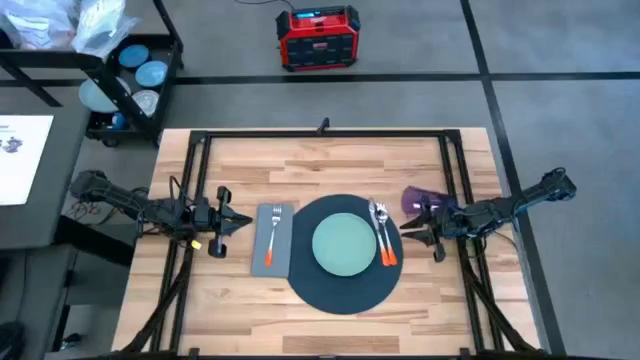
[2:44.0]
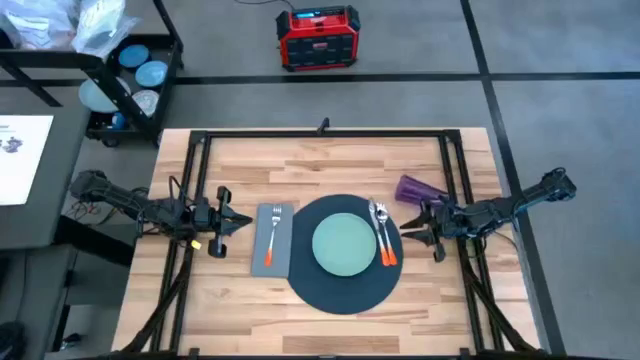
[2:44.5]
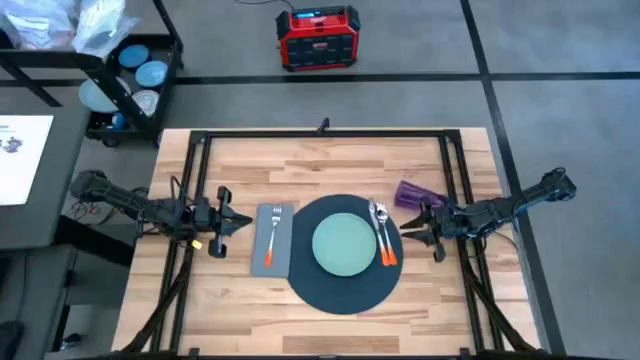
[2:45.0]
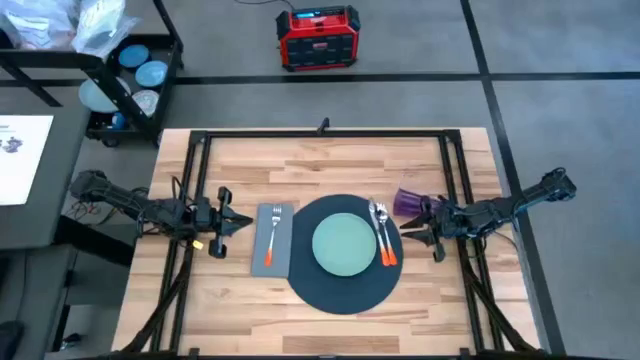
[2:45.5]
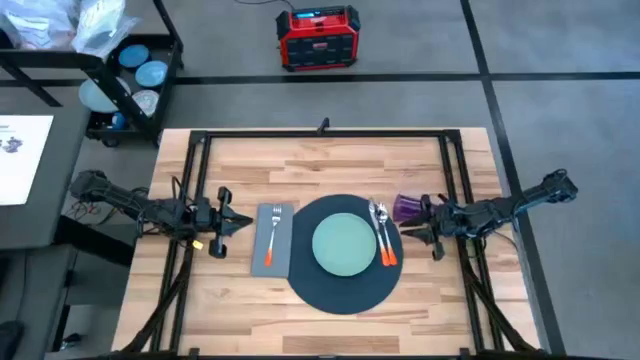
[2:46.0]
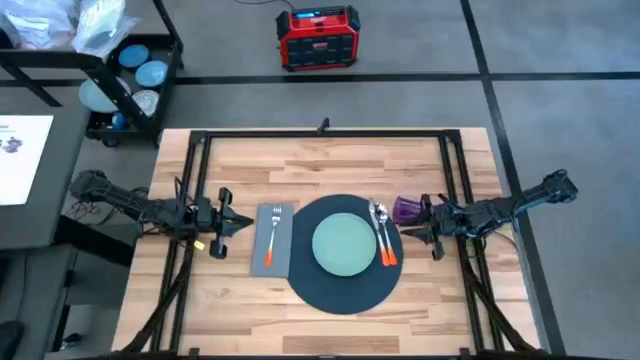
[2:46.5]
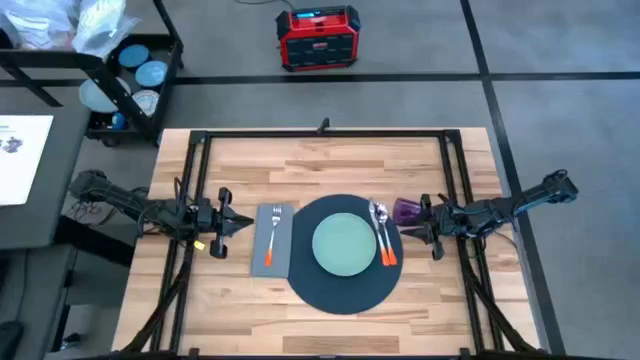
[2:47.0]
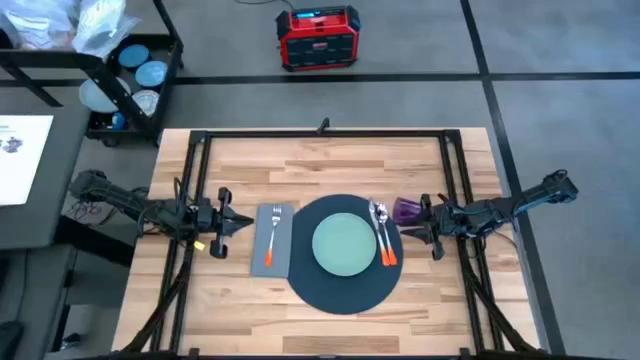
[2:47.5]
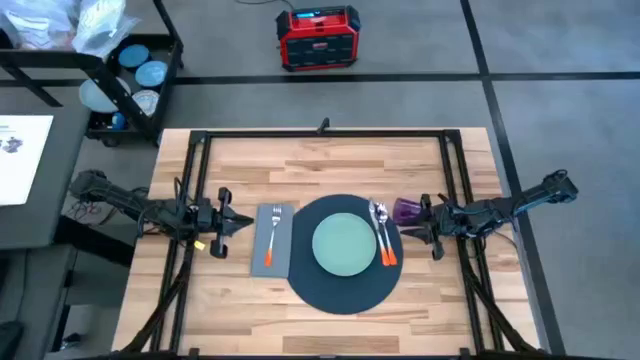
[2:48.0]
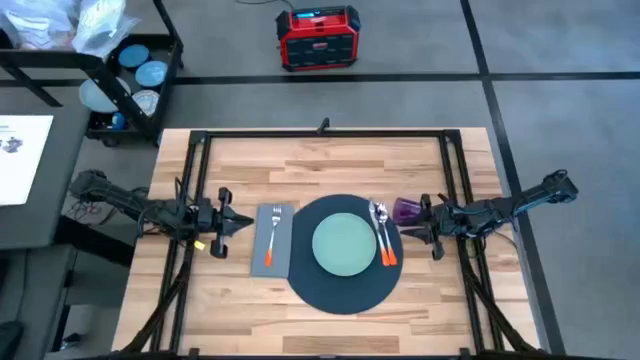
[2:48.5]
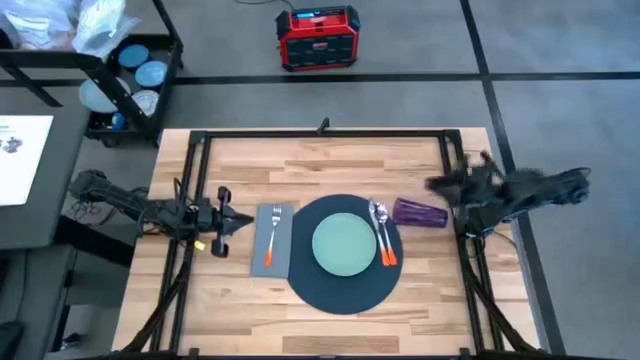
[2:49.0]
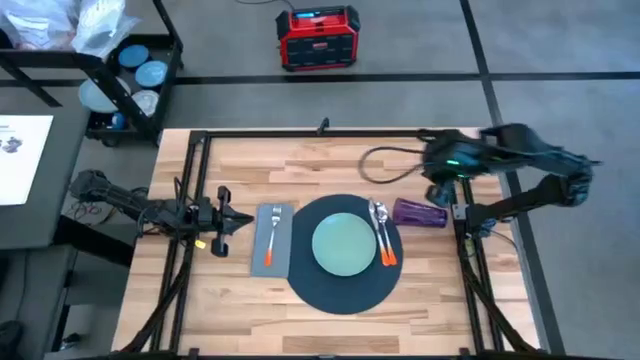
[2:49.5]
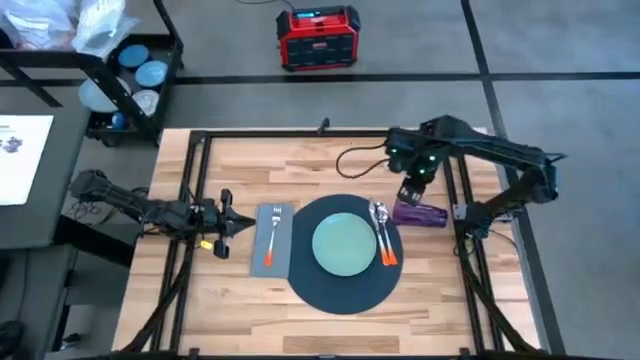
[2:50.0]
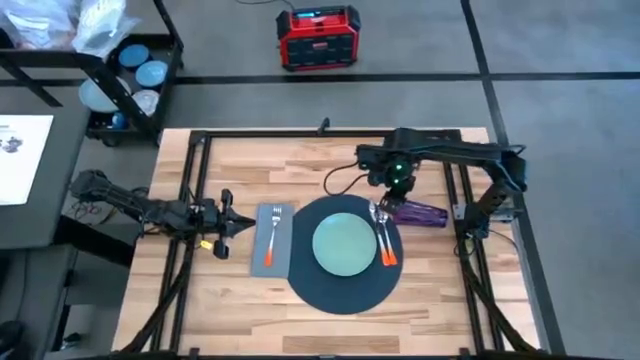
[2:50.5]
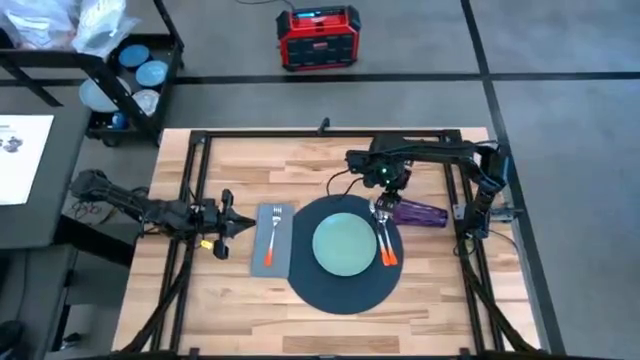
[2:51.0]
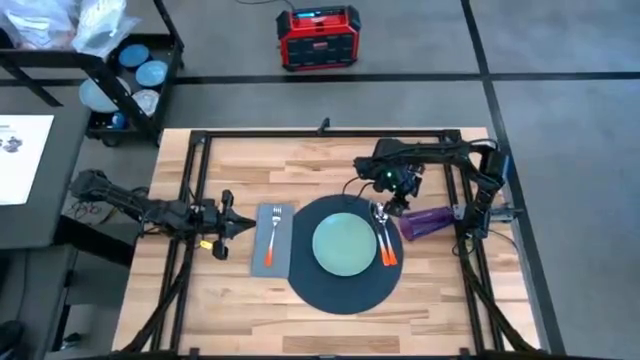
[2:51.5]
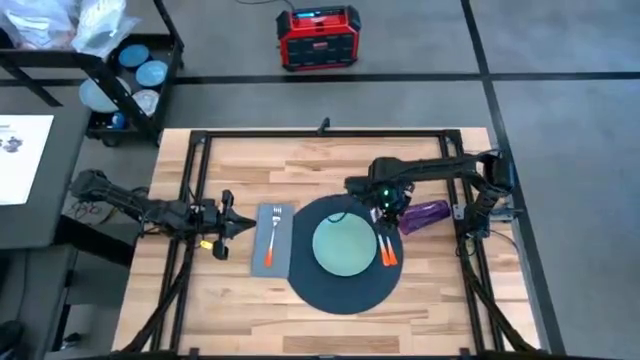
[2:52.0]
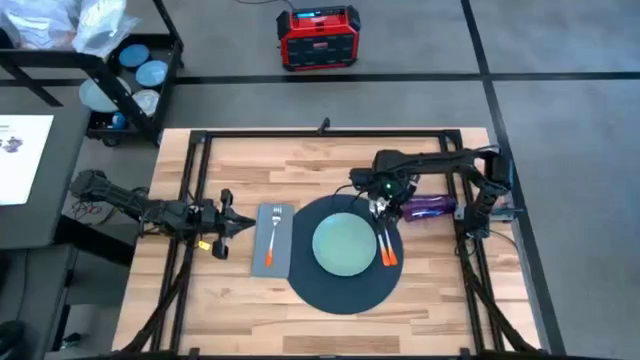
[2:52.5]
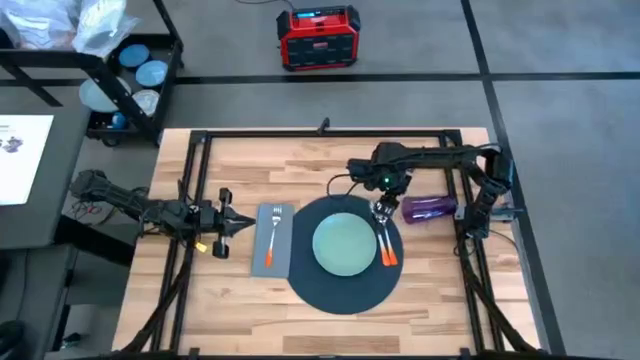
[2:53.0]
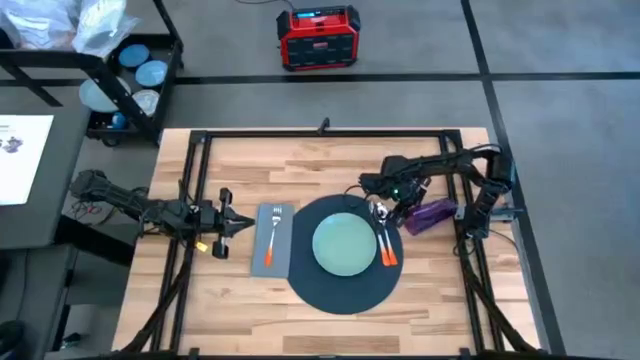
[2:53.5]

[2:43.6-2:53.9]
Task: Set table place
Move the purple glass to the right side of the blue placemat

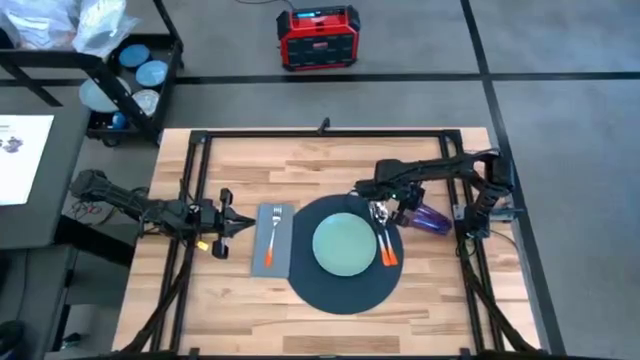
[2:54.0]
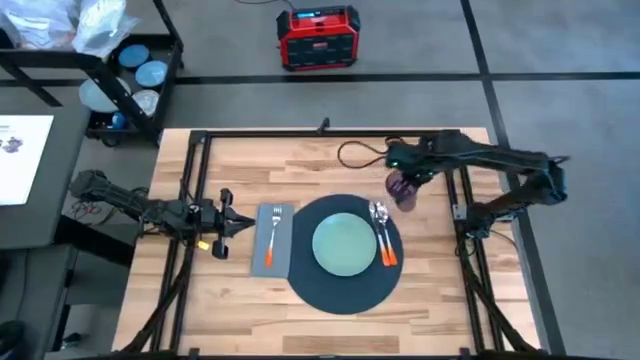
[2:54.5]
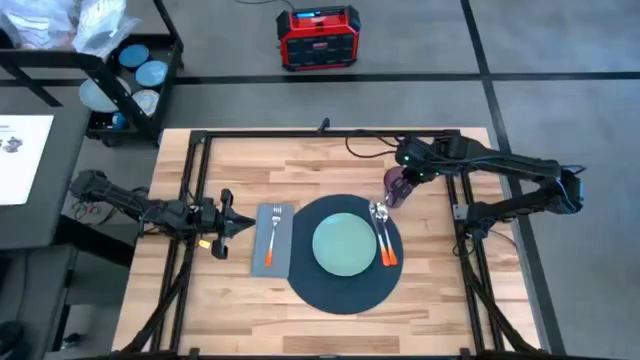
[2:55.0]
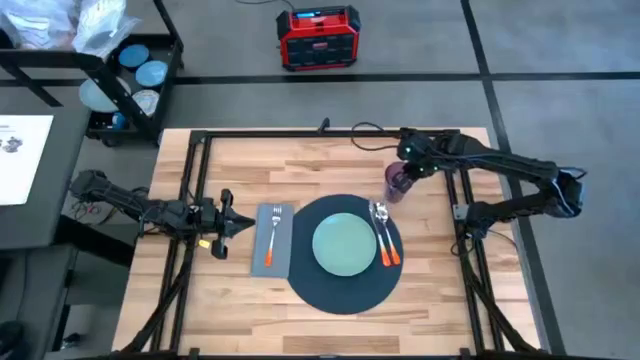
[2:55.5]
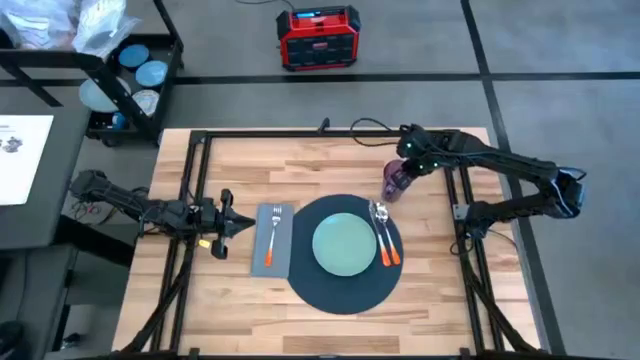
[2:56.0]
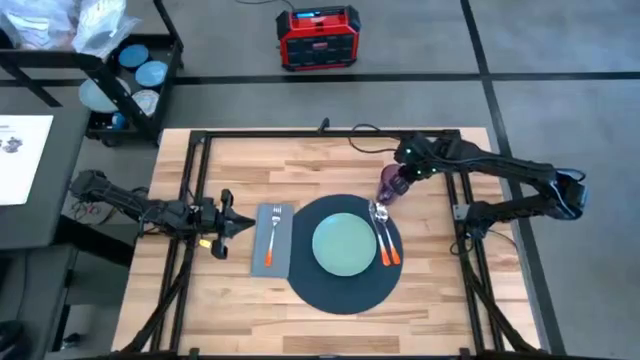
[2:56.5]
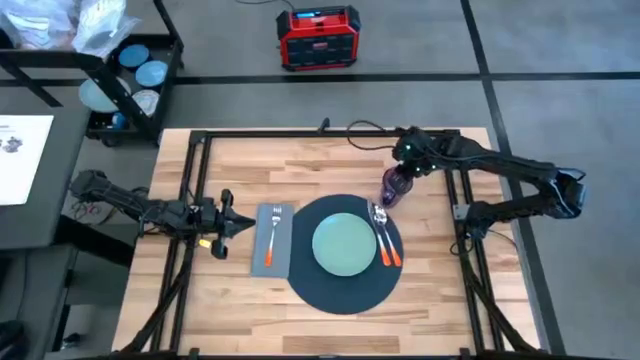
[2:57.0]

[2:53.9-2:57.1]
Move the purple glass to the right side of the blue placemat

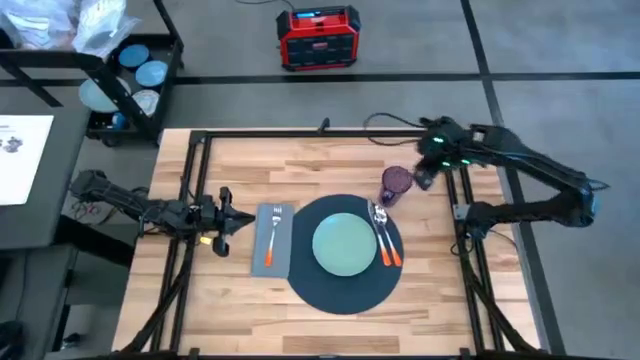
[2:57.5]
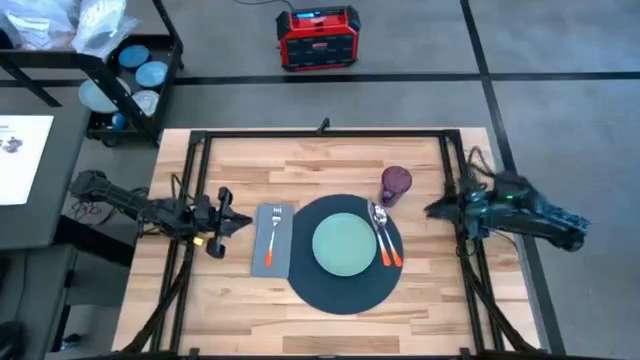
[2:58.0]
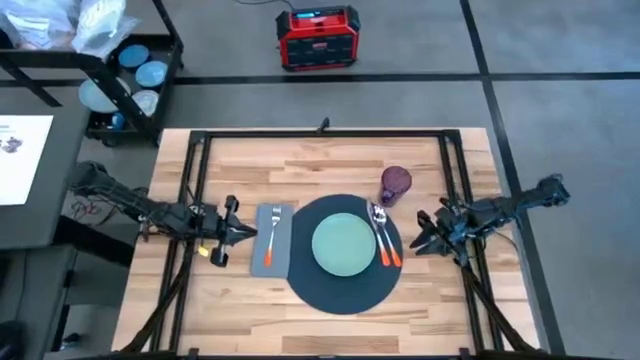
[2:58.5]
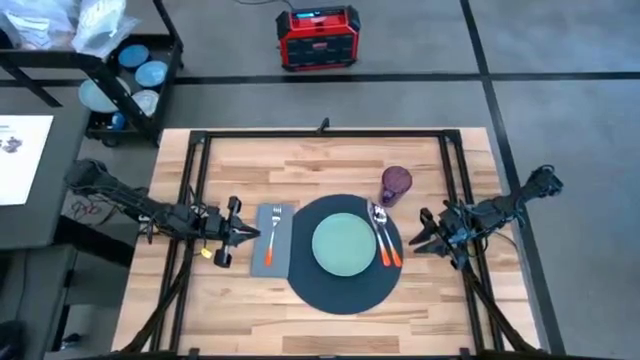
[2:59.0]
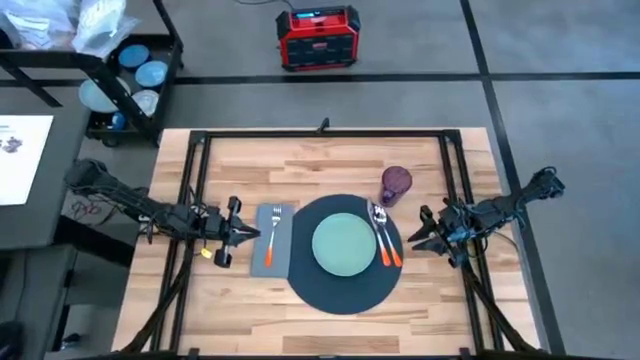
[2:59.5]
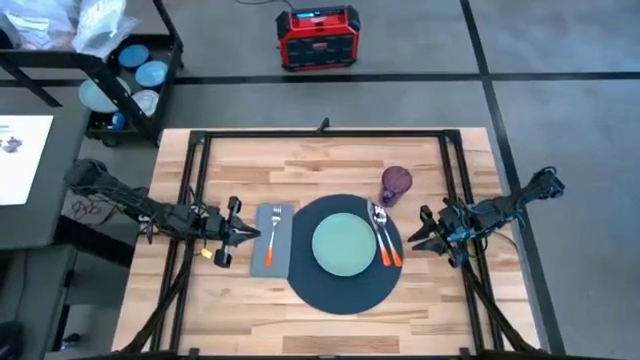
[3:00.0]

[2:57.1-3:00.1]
Return to Home Position

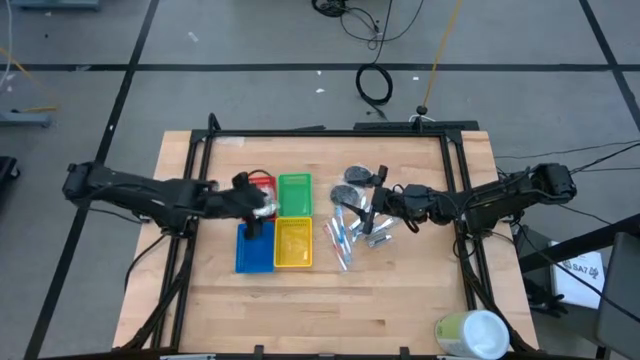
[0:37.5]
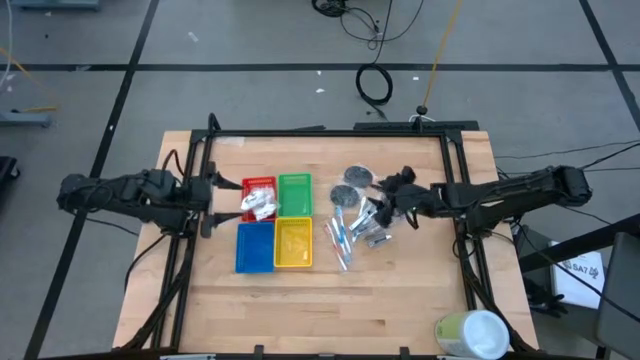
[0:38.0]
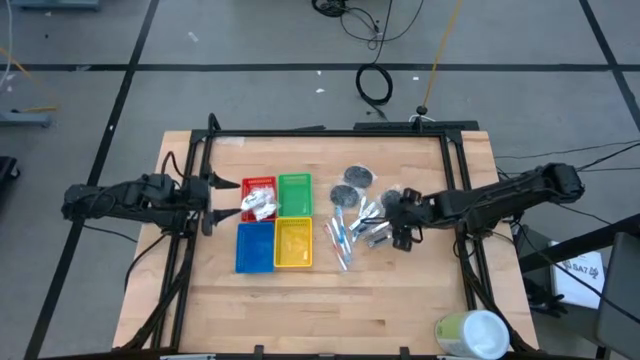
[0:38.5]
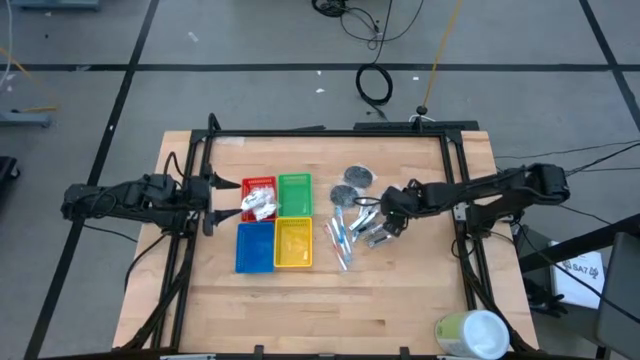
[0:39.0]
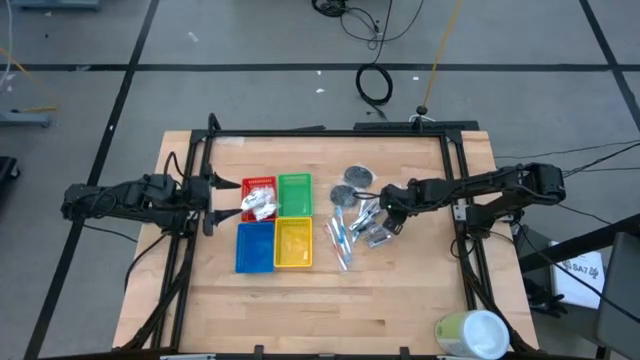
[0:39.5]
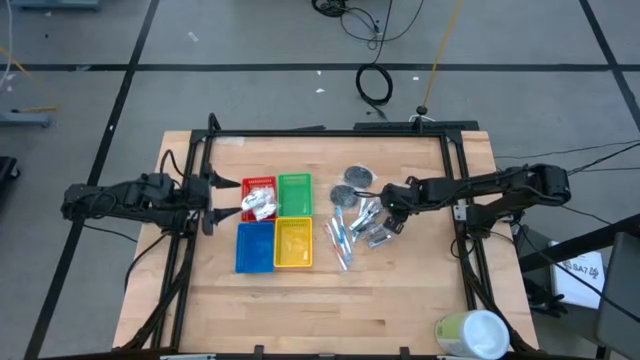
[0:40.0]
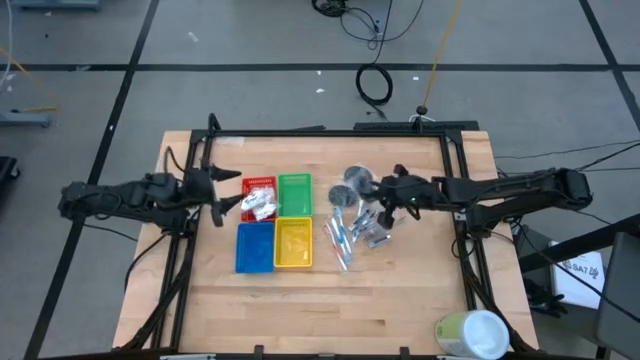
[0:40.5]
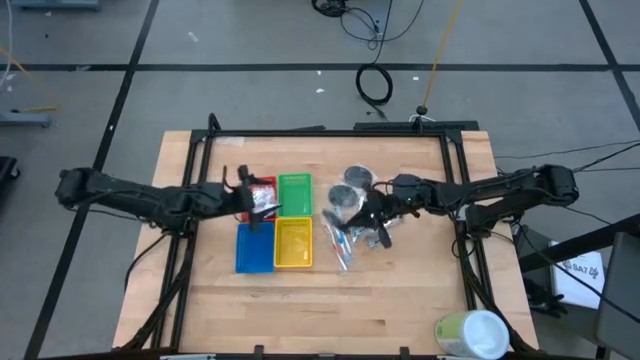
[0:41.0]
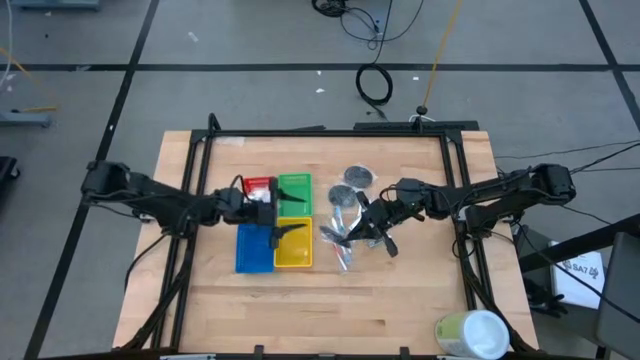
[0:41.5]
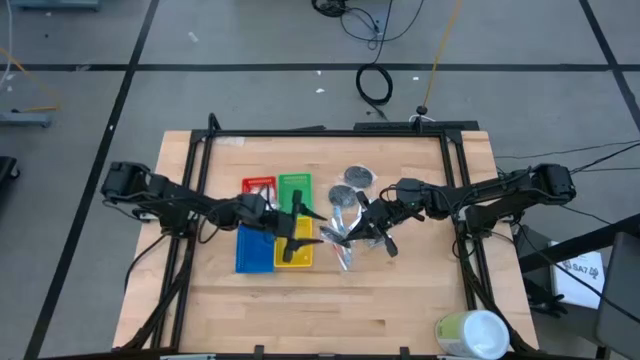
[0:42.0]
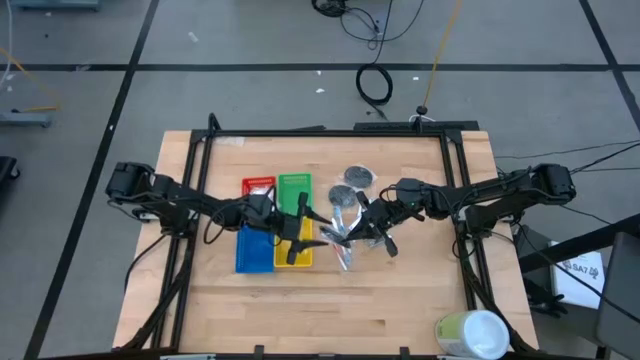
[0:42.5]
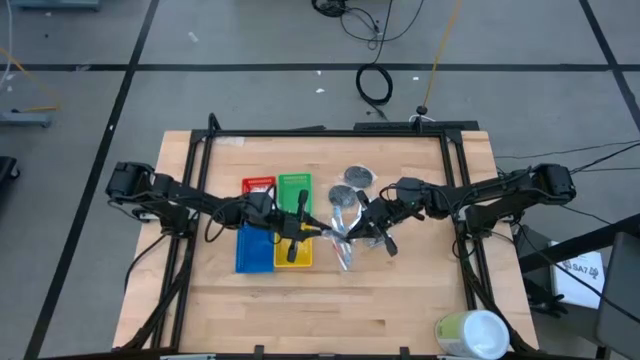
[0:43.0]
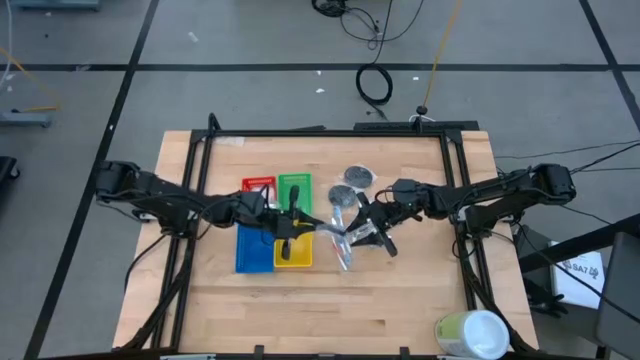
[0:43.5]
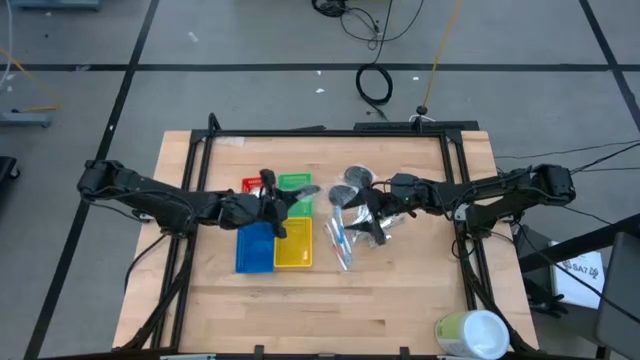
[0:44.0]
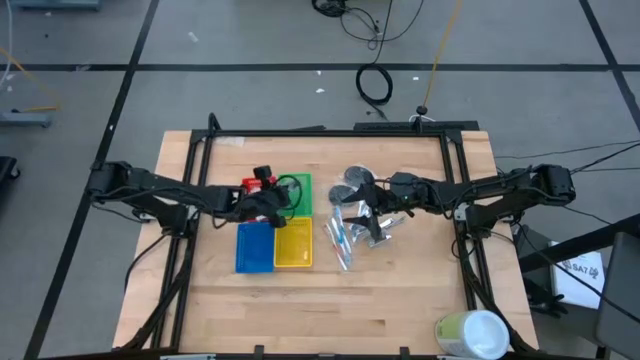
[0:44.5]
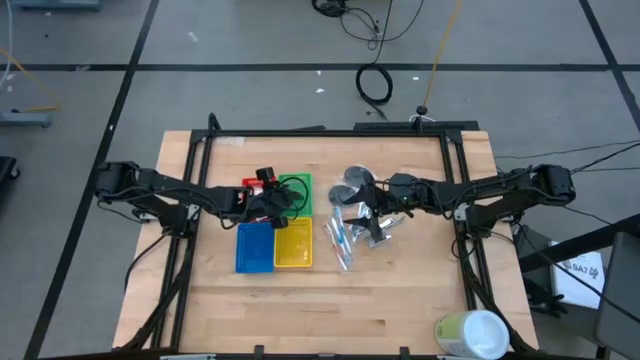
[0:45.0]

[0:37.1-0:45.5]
Task: Pick & Place Travel size toiletries
Put the black hairbrush into the green bin
